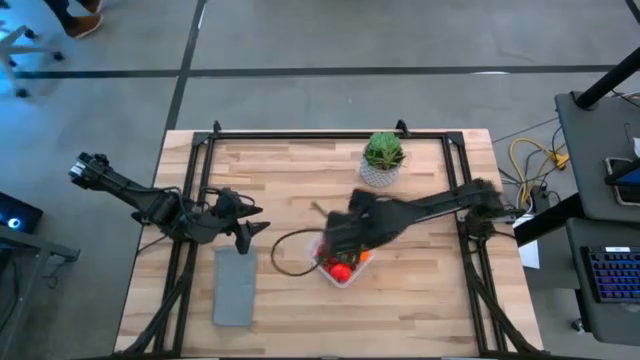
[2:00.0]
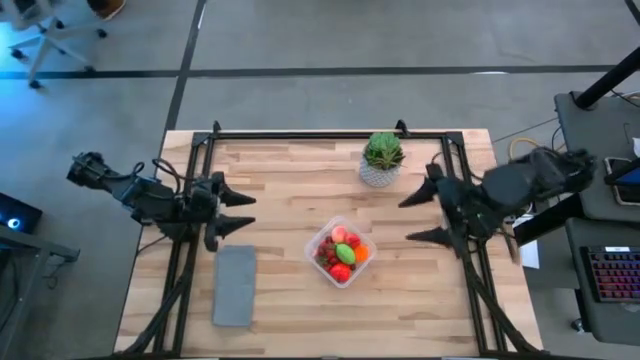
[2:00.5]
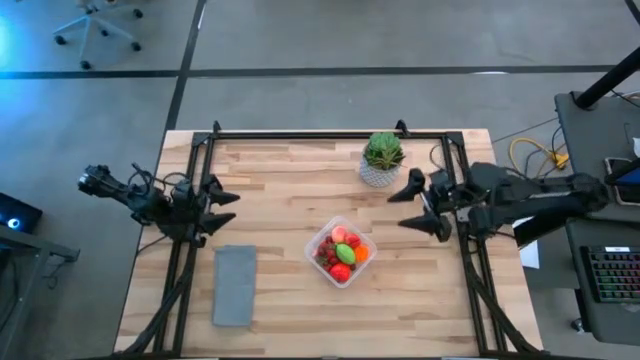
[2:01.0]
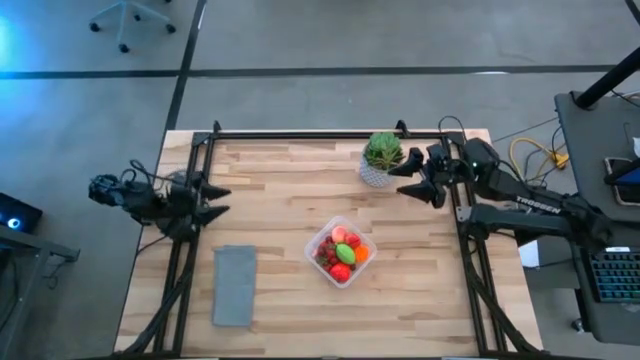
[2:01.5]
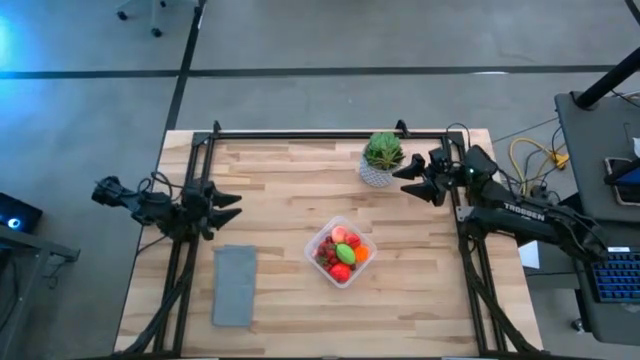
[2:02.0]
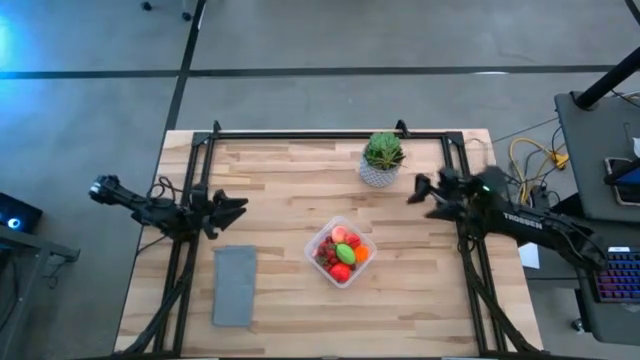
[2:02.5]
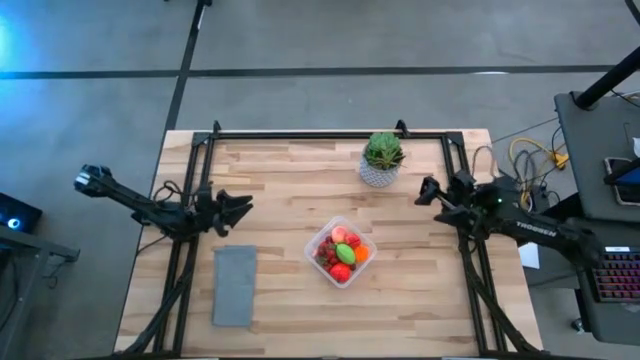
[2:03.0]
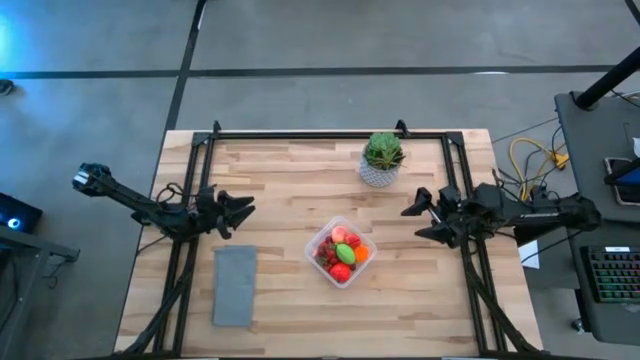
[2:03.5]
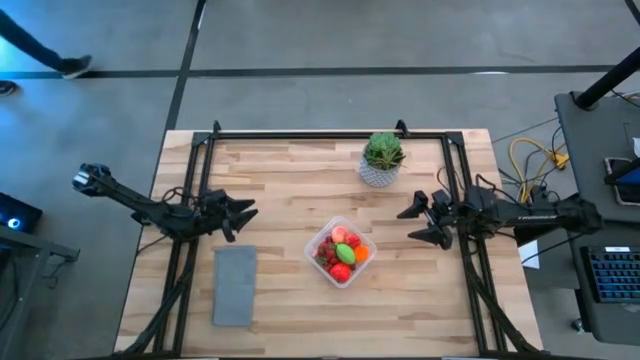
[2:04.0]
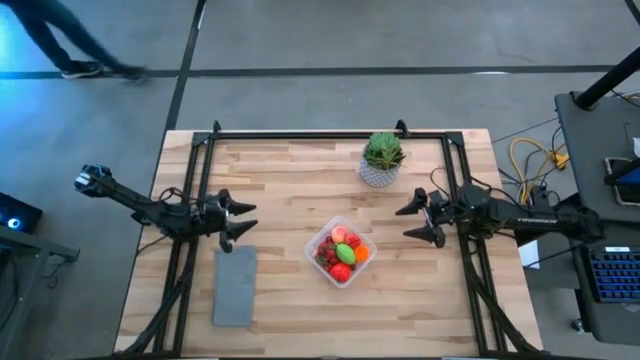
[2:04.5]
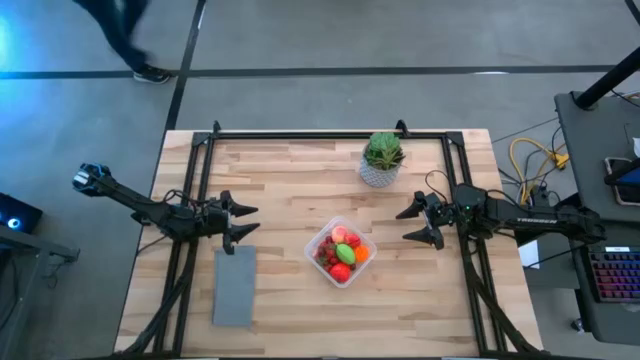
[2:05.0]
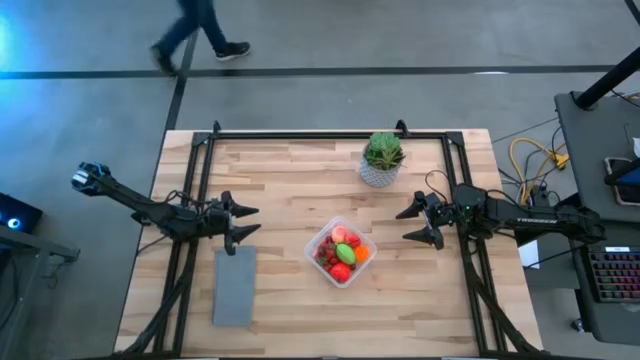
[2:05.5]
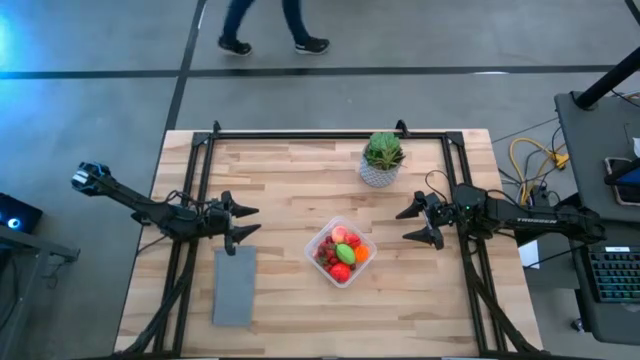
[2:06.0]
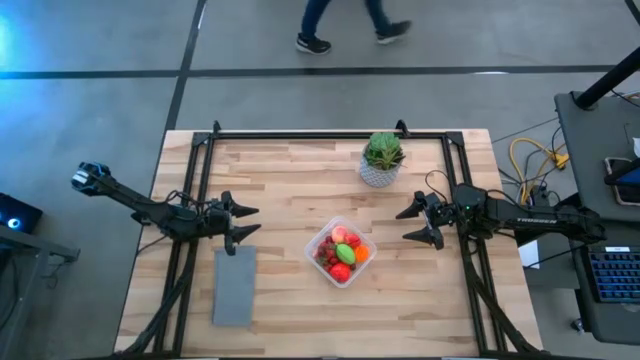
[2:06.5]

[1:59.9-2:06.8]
Task: Pick and placing Produce into tupperware
Return to Home Position

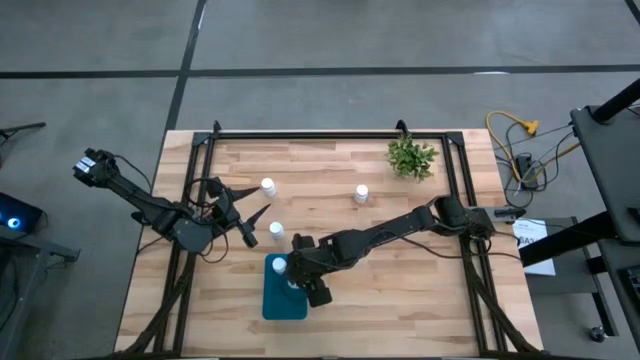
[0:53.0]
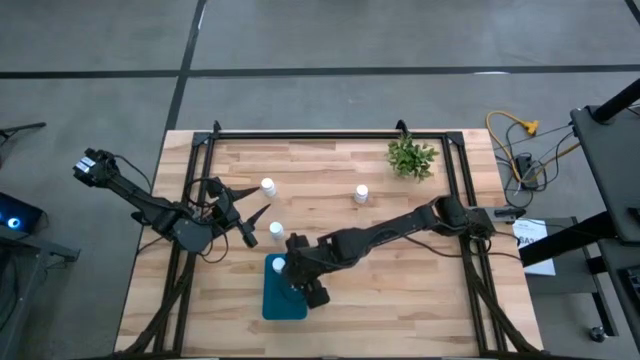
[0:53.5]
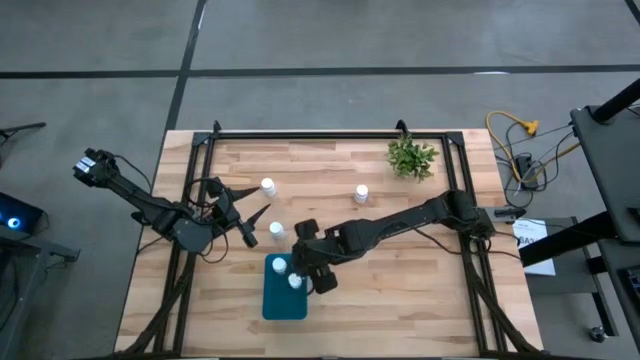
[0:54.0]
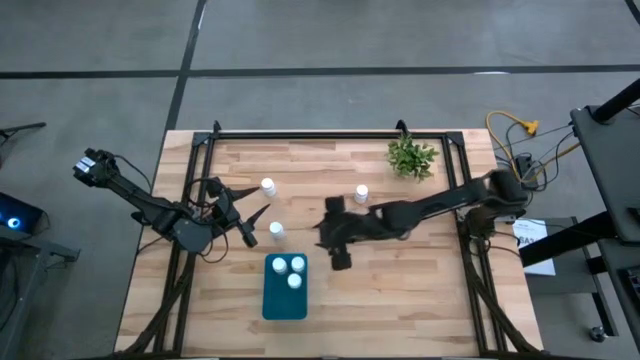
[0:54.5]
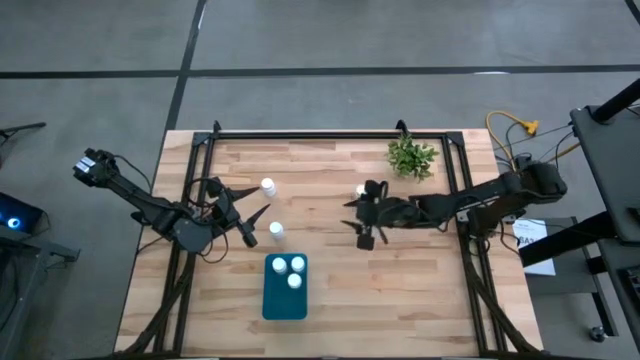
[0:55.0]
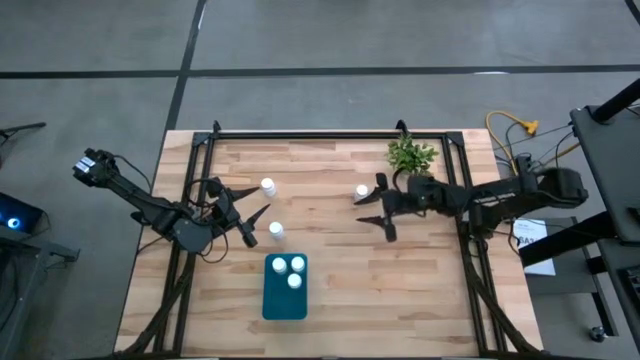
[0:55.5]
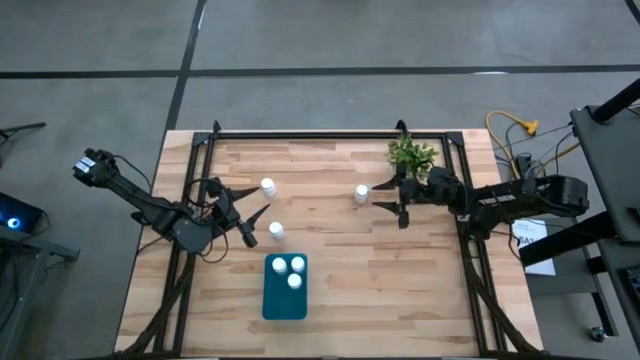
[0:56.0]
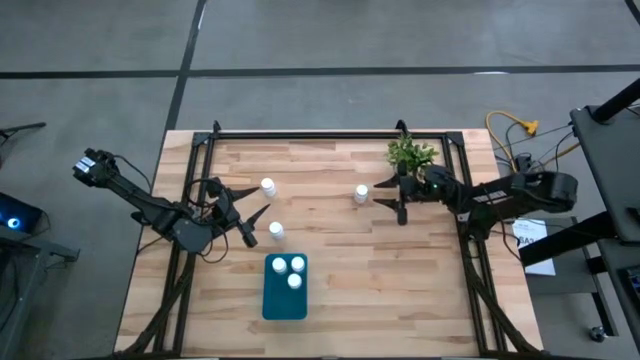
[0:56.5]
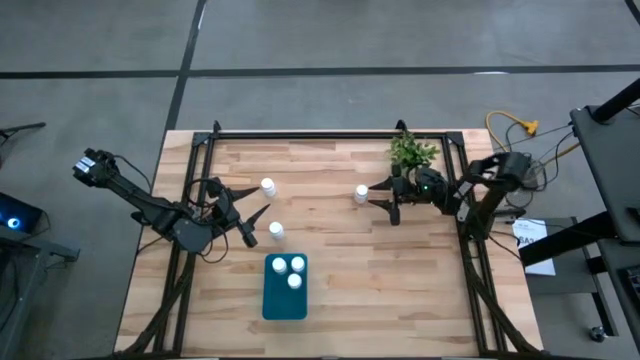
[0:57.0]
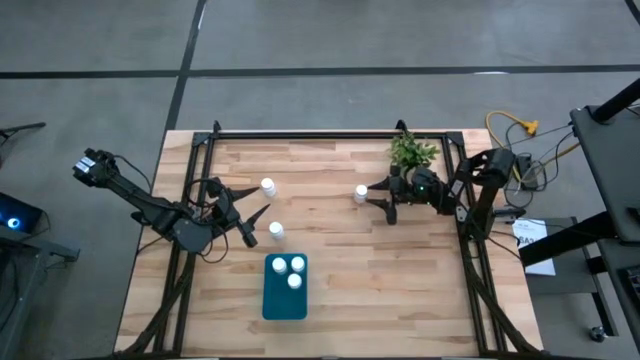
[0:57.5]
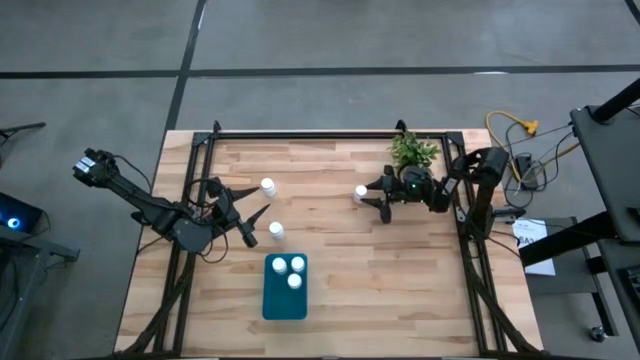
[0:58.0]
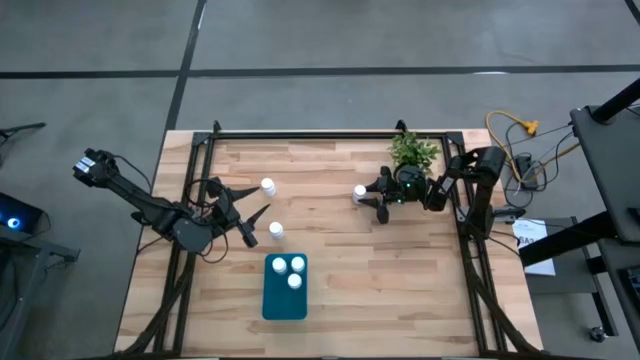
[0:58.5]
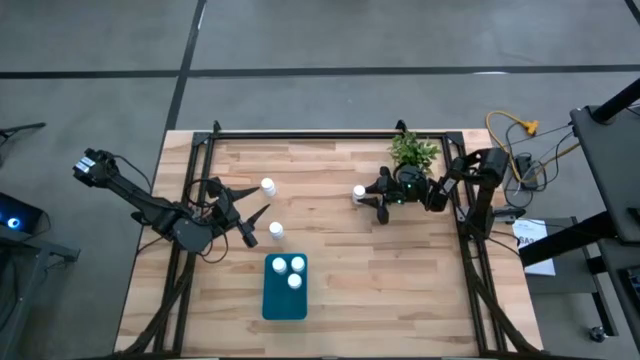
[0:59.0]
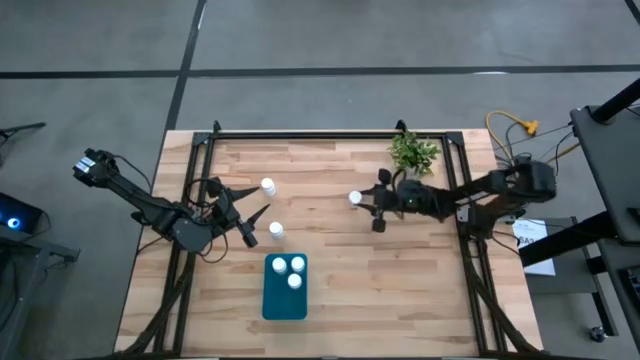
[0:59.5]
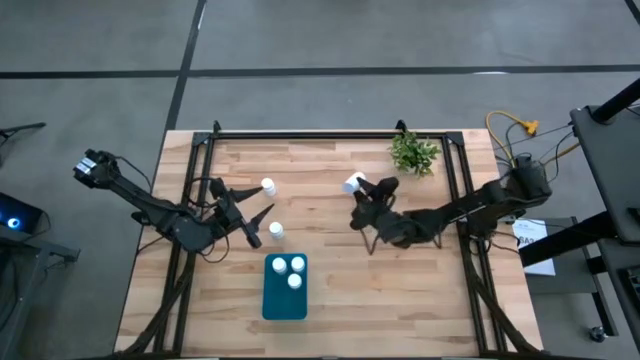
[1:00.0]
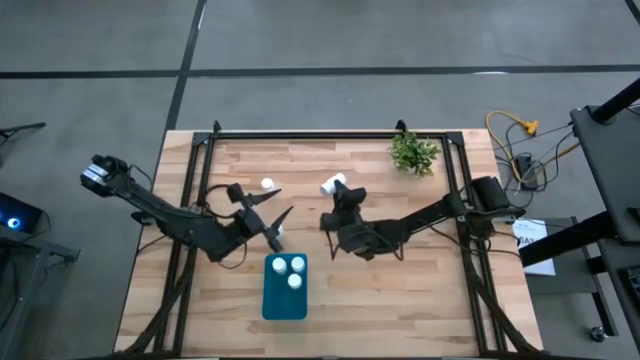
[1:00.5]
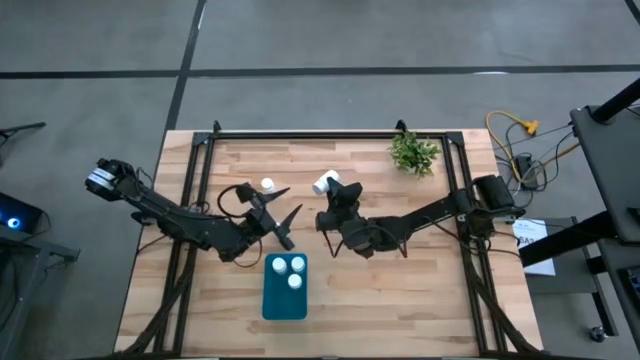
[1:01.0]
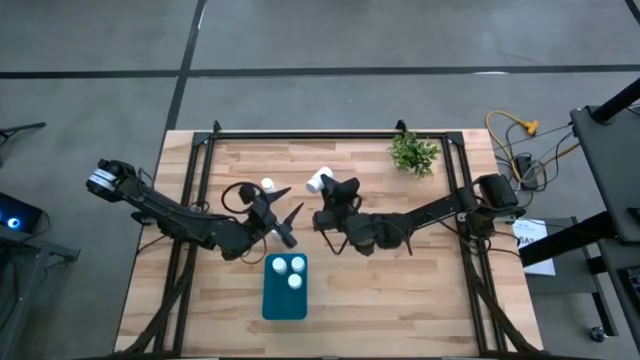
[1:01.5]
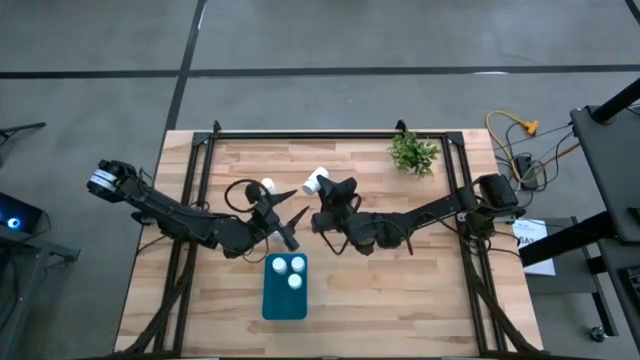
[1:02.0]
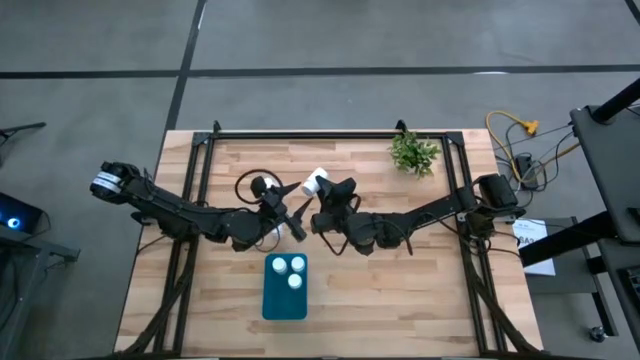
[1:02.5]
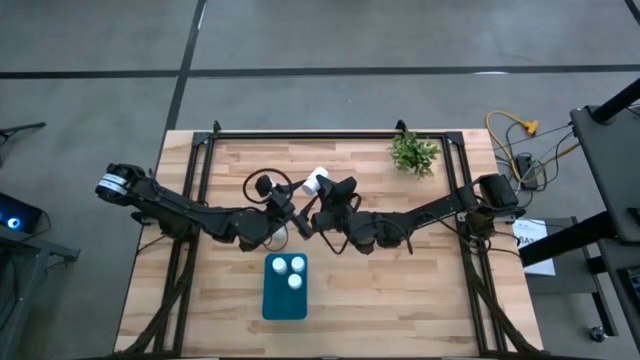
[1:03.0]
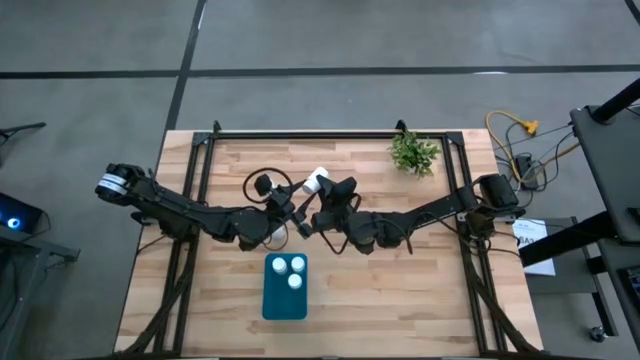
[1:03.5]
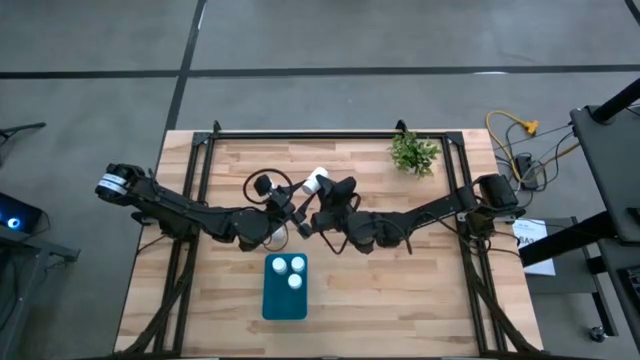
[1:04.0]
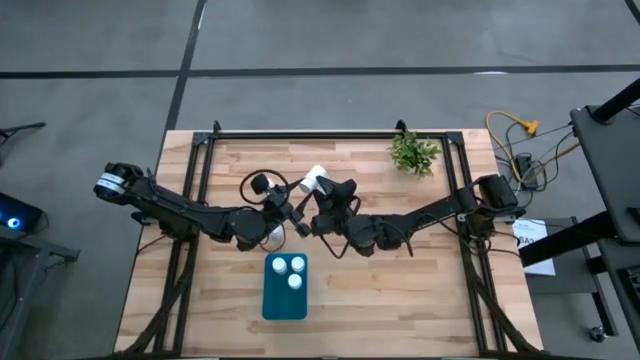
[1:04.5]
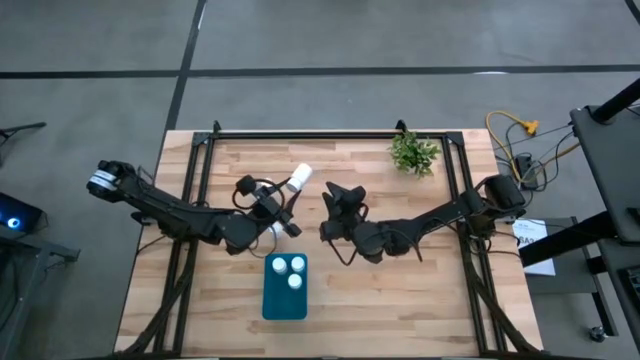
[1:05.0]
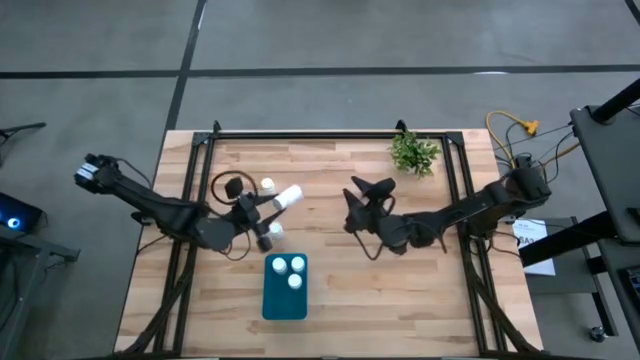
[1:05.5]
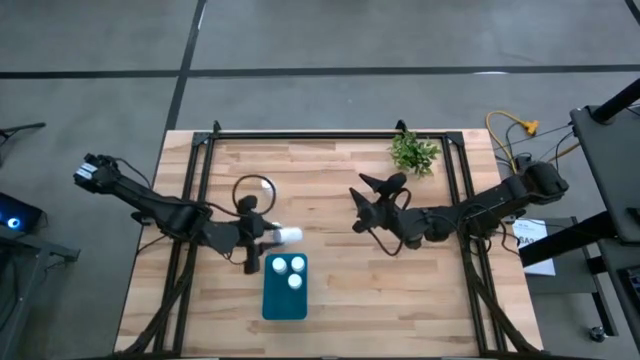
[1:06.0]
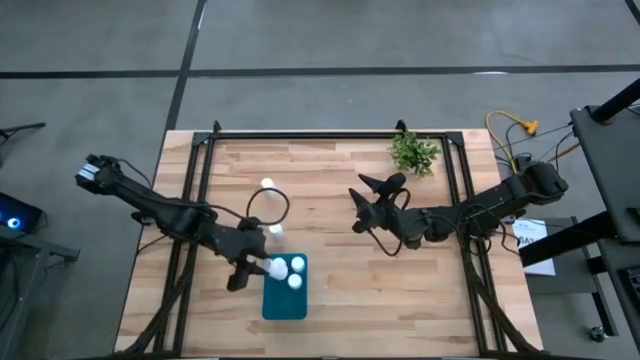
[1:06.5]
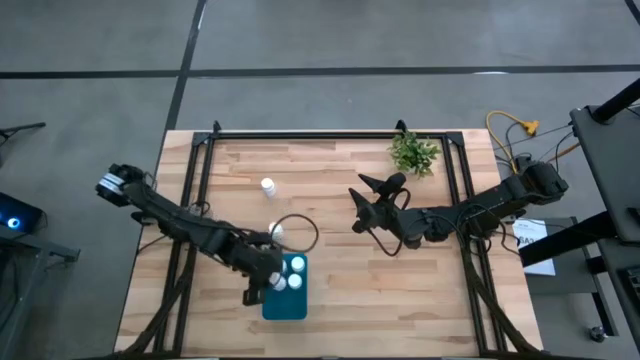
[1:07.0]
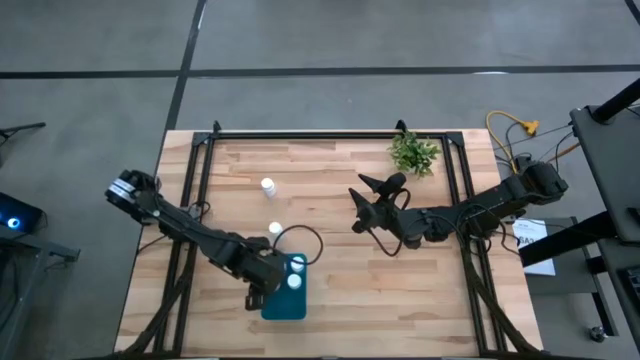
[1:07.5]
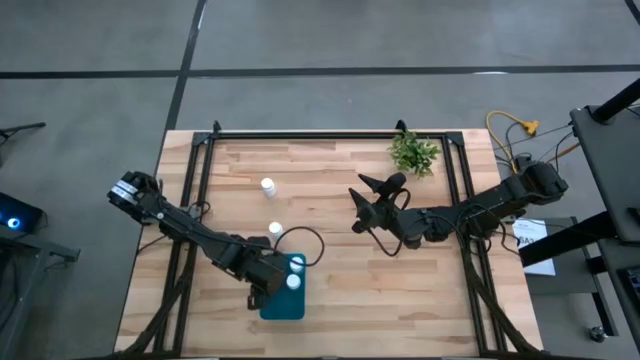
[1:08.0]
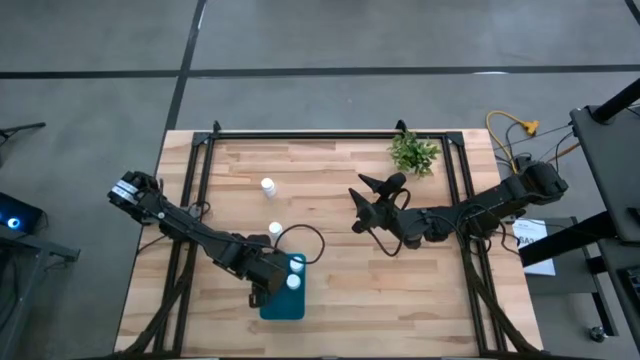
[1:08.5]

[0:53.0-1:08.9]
Task: Pick and place pill bottles into a basket
Put the white pill bottle into the blue bin
